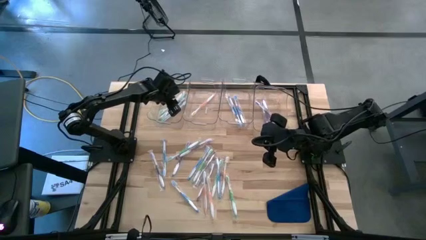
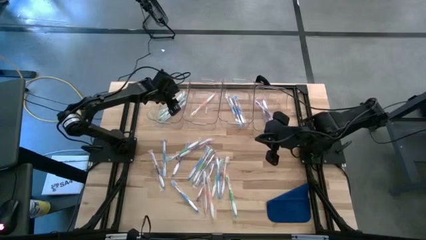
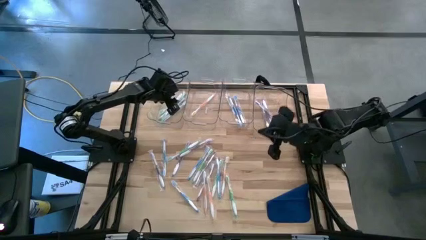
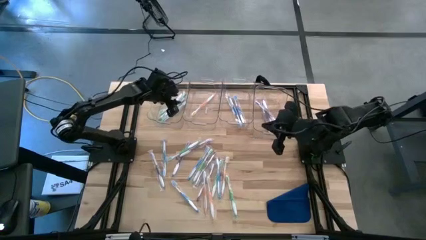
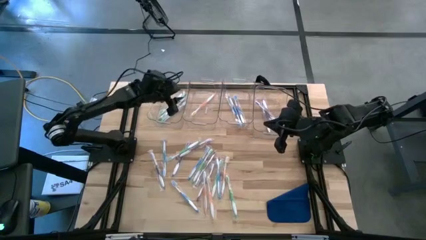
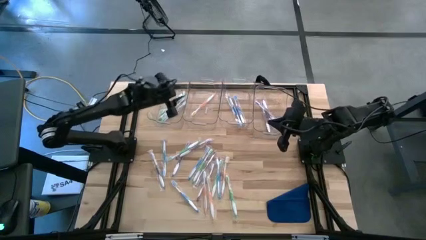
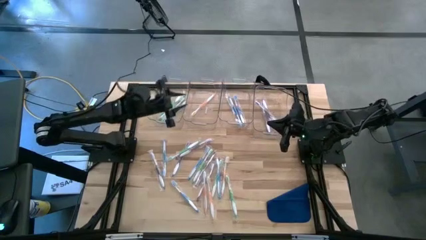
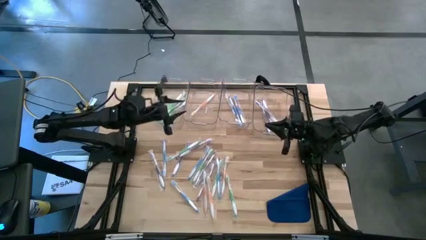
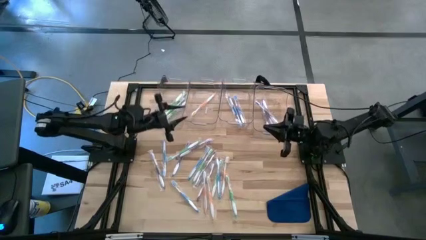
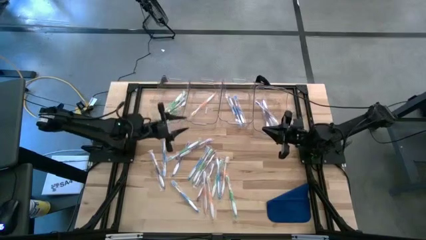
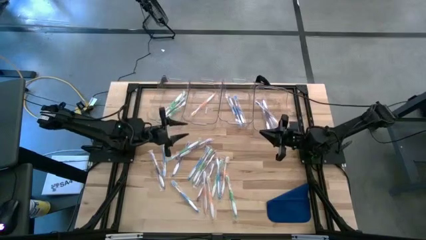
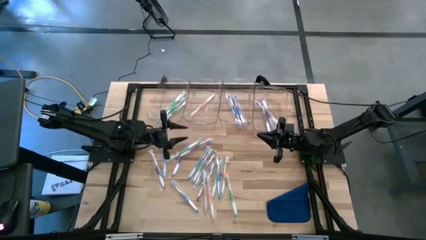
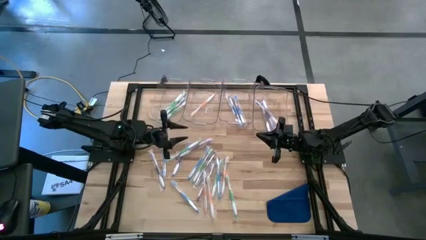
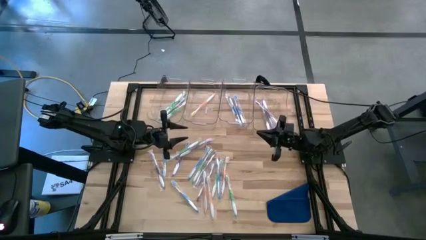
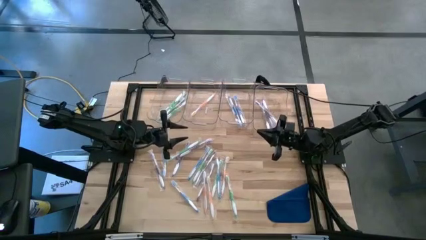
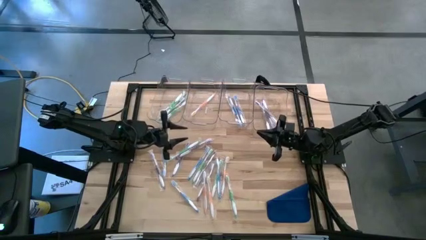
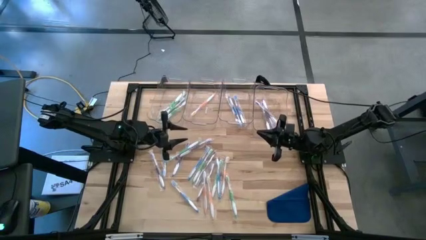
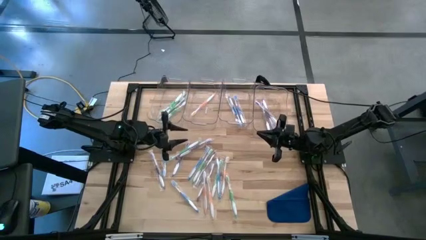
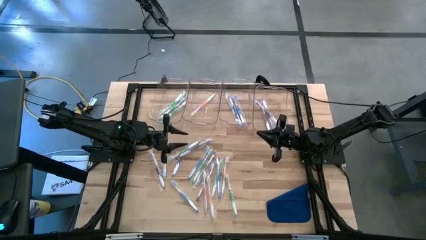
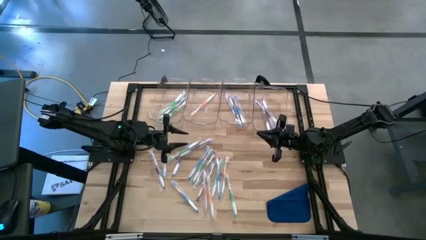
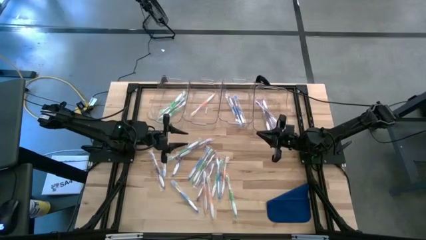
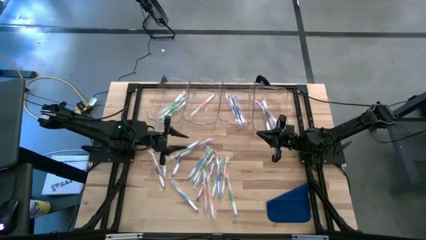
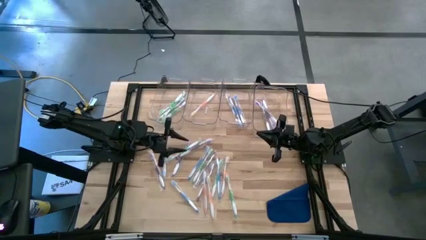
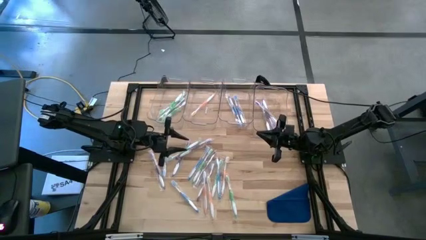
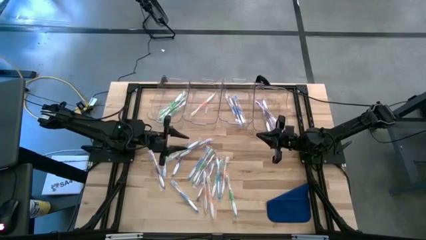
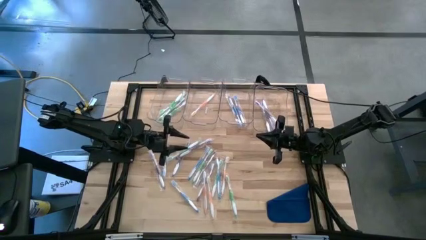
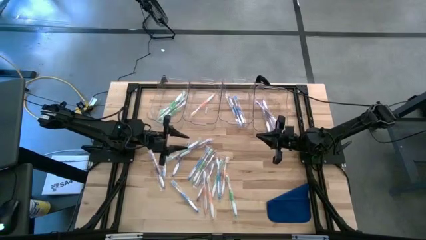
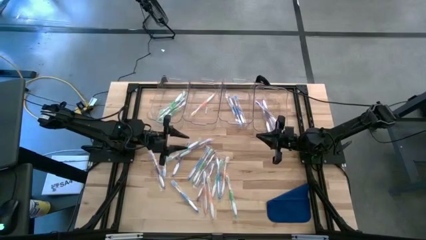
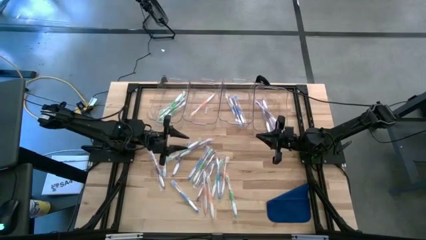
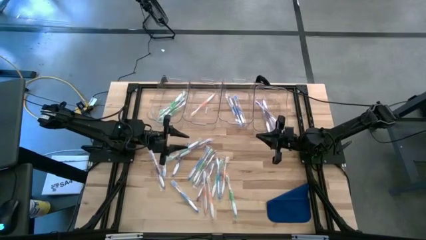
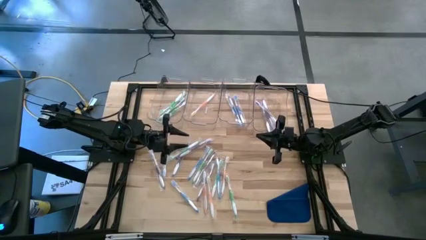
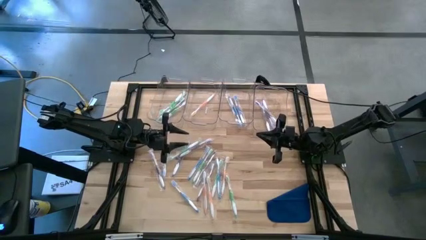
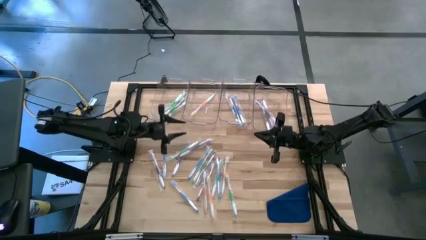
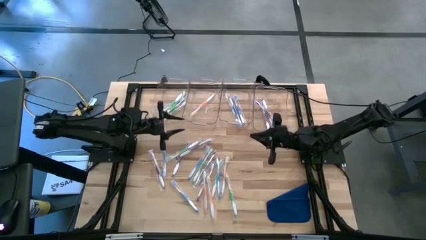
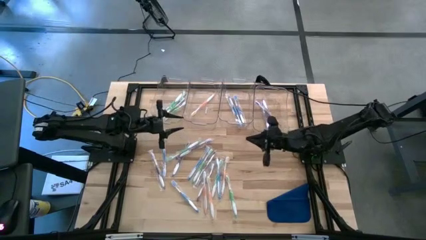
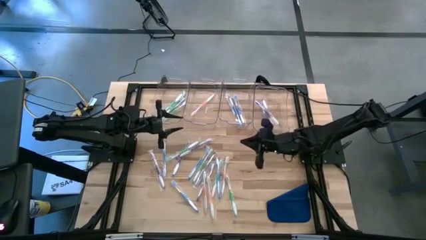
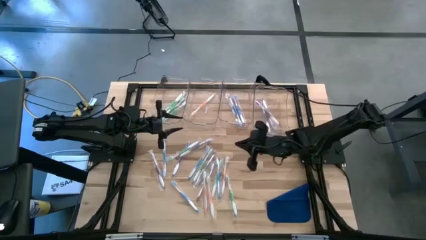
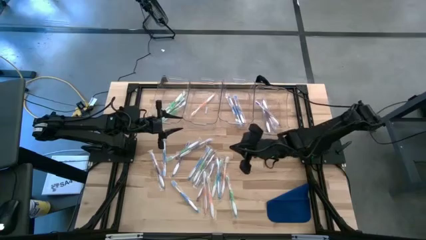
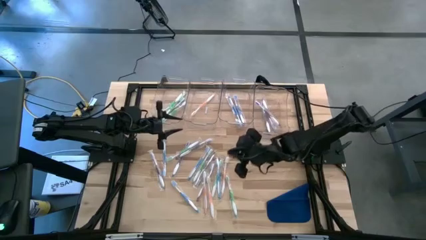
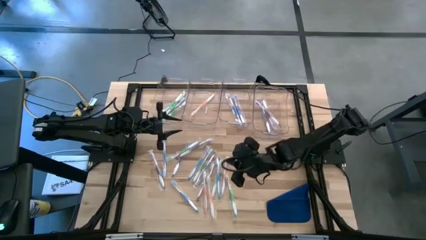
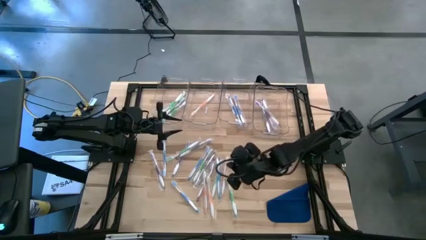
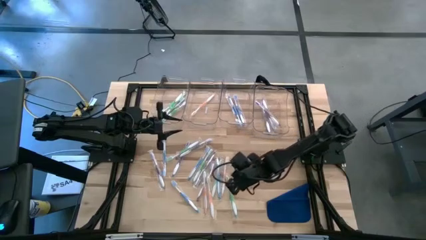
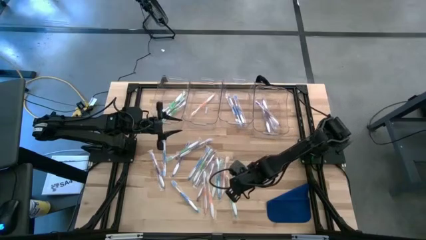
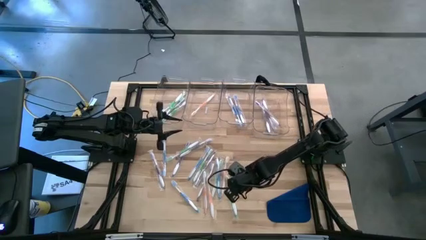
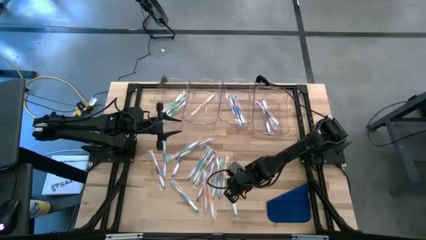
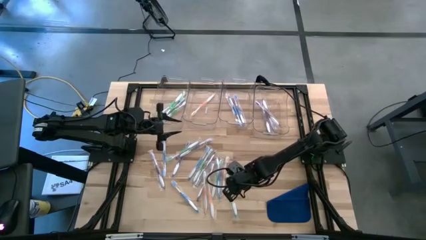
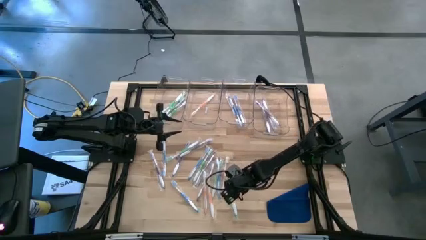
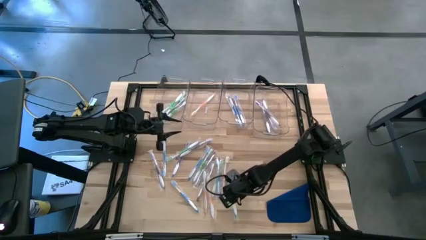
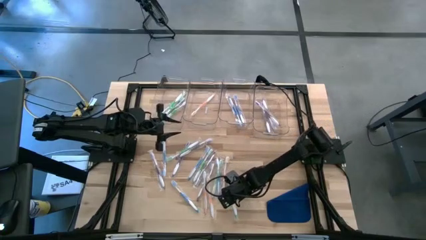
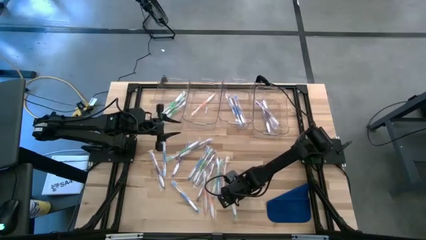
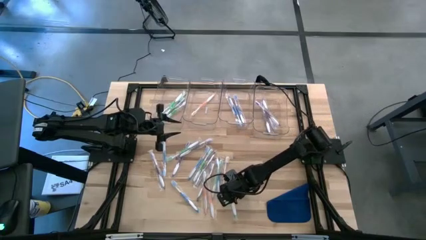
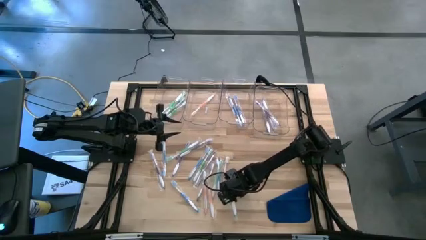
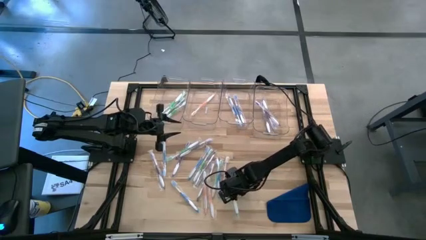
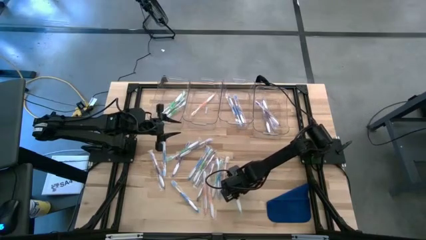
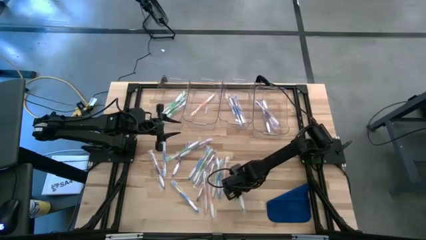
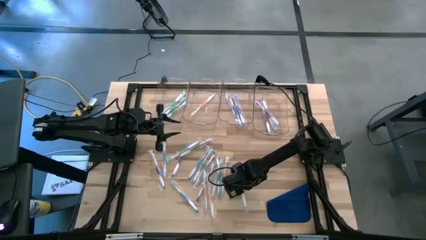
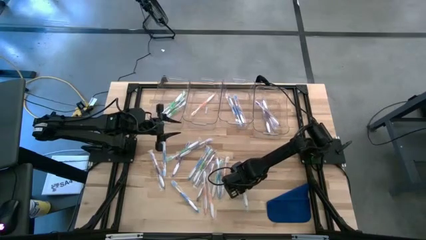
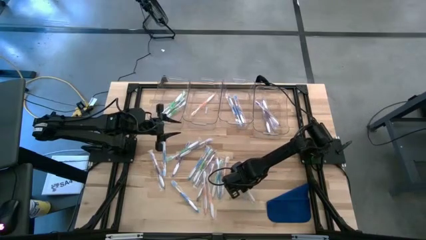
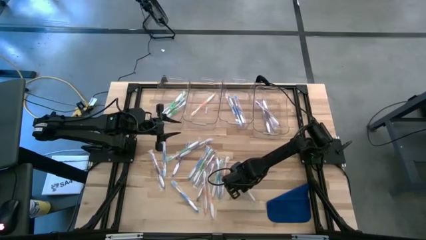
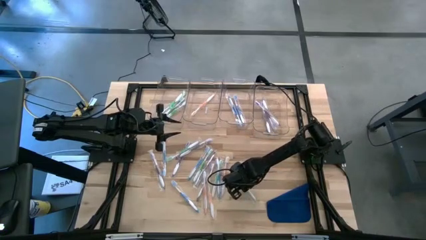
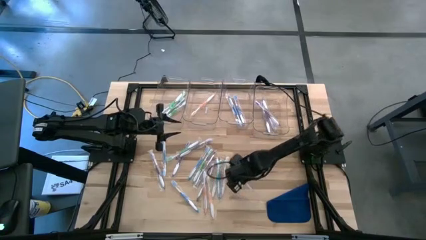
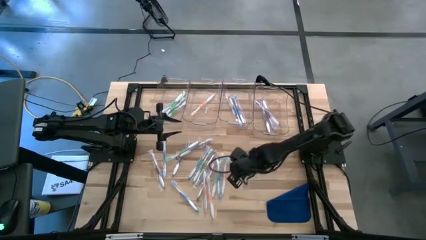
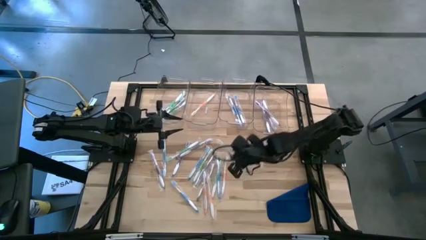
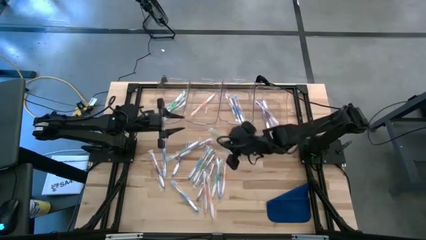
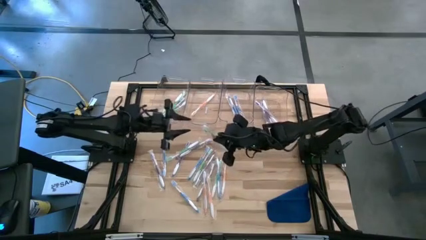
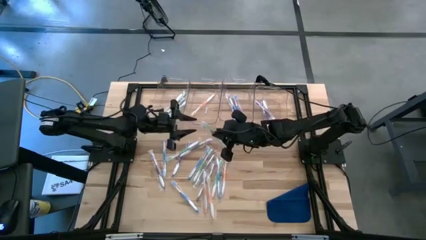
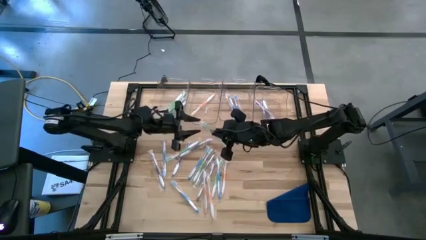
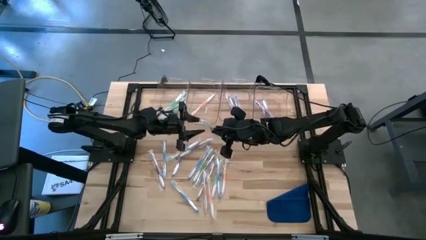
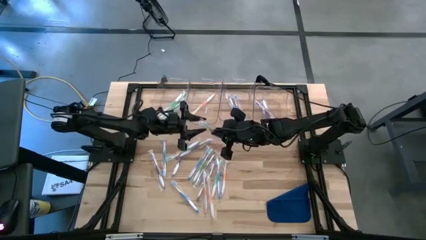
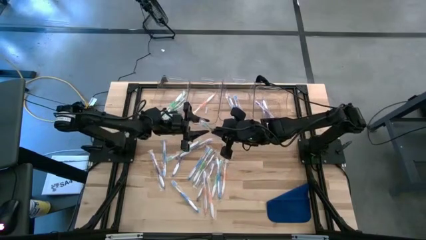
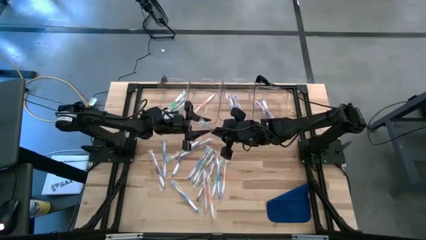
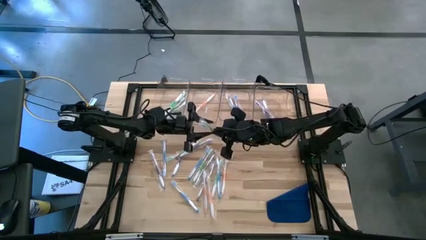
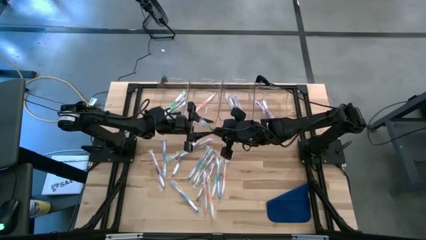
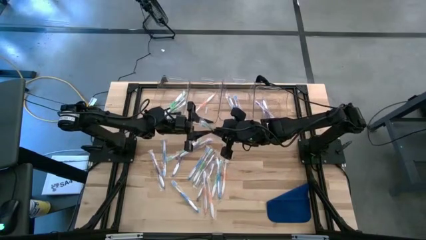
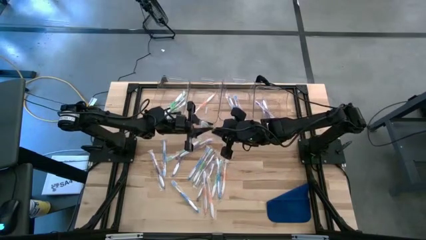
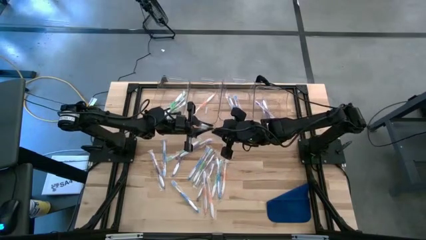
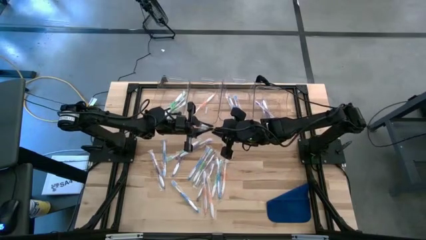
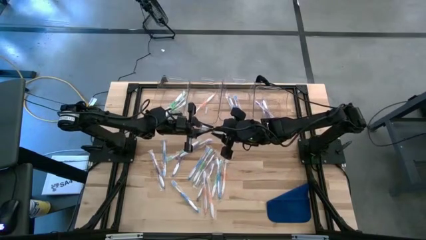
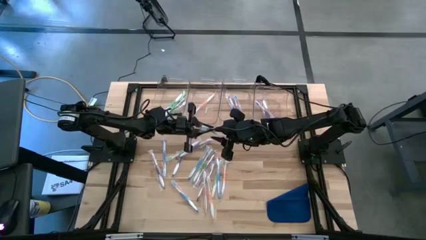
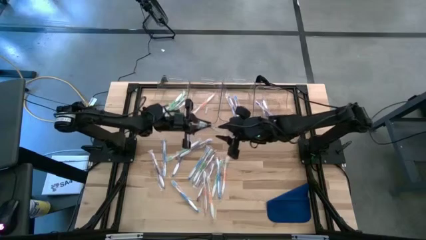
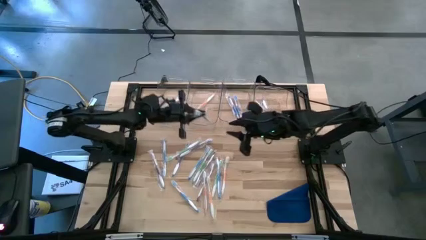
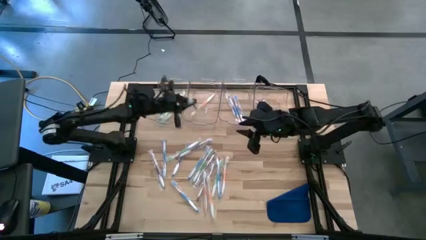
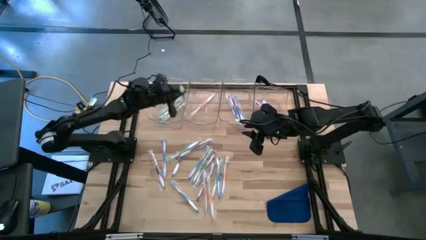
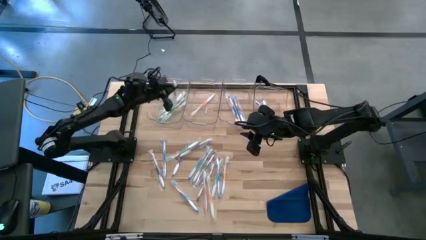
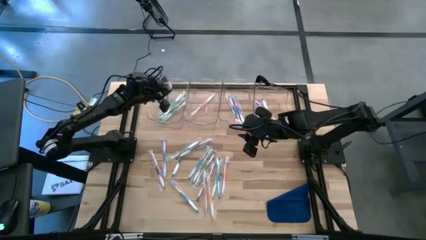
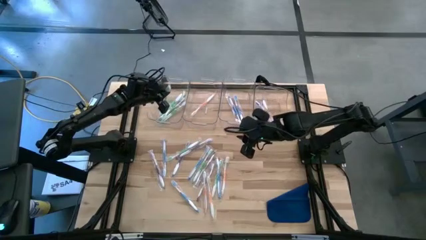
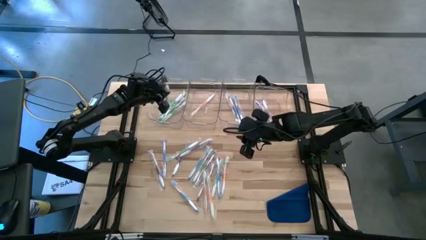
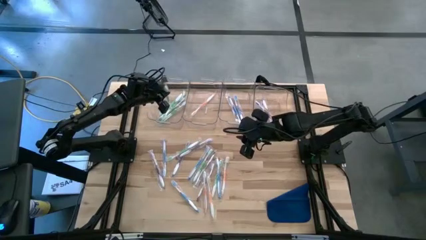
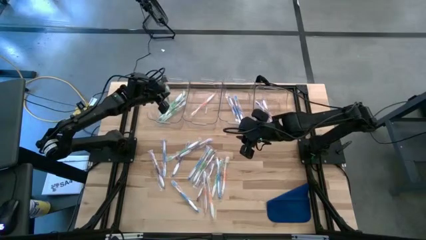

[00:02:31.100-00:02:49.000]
Task: Pick & Place Toothbrushes
Put the green toothbrush into the left transparent bin
